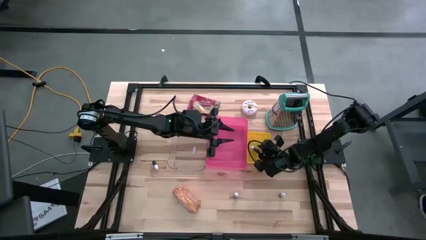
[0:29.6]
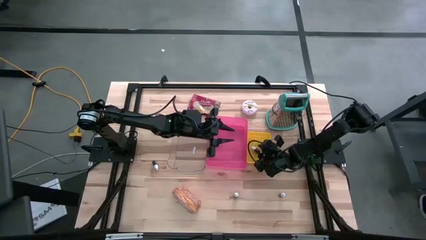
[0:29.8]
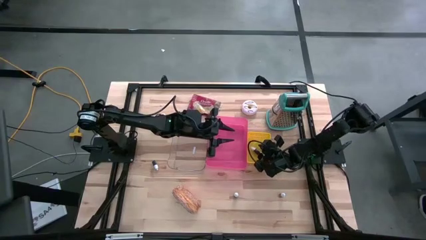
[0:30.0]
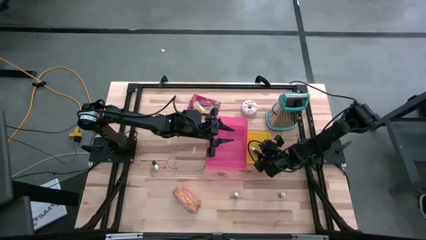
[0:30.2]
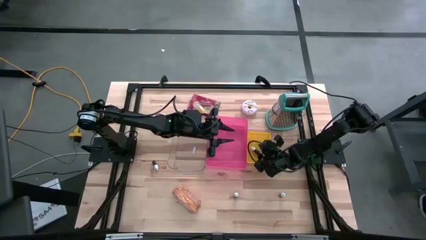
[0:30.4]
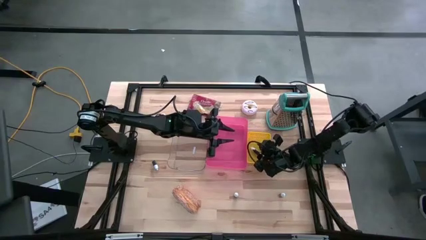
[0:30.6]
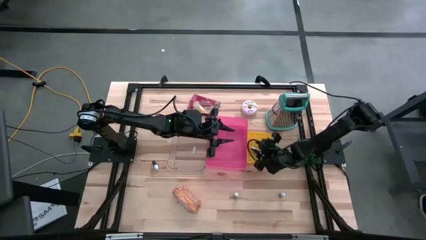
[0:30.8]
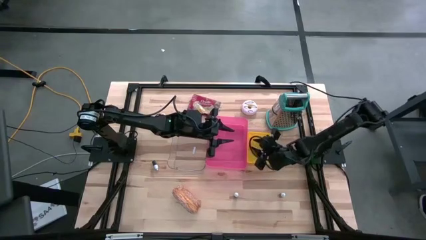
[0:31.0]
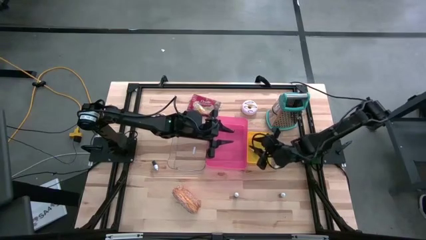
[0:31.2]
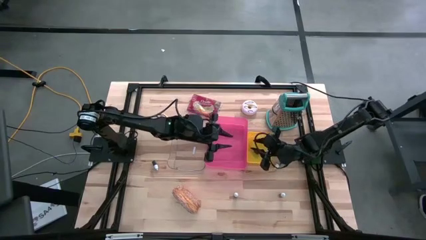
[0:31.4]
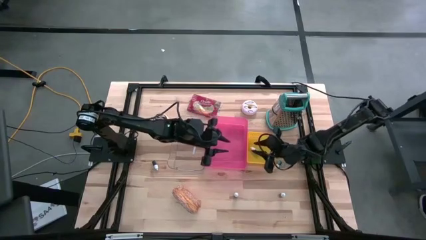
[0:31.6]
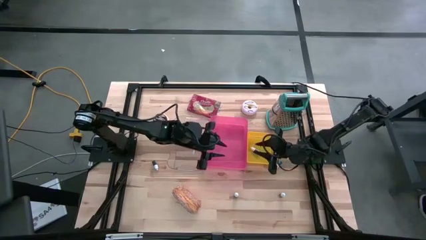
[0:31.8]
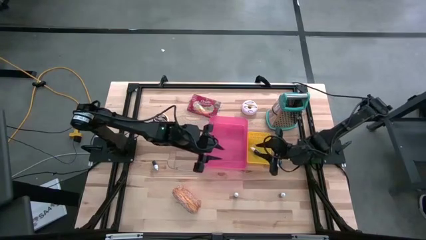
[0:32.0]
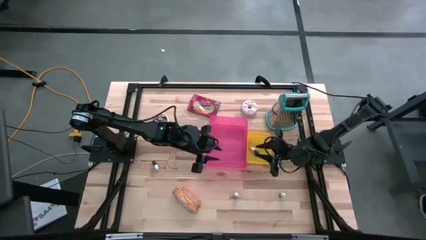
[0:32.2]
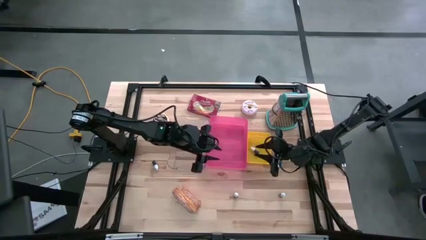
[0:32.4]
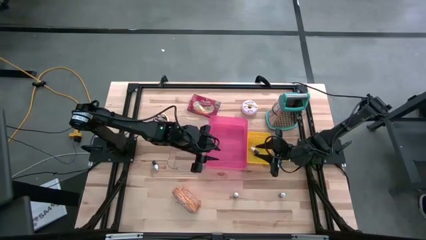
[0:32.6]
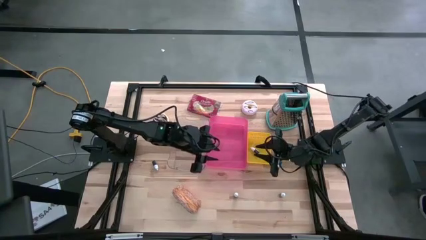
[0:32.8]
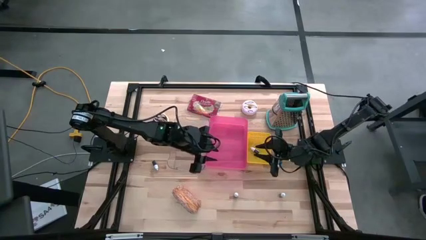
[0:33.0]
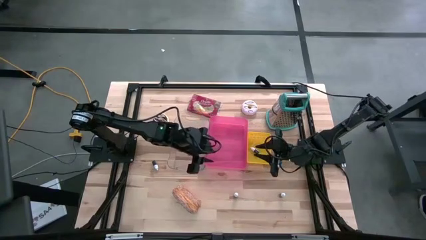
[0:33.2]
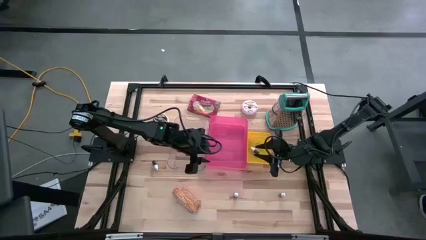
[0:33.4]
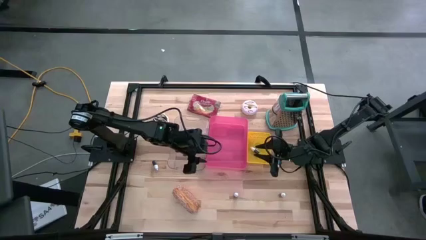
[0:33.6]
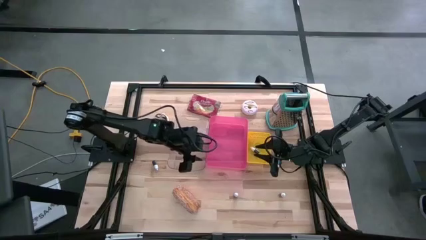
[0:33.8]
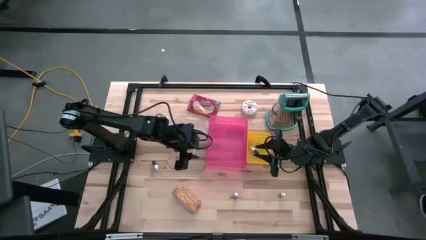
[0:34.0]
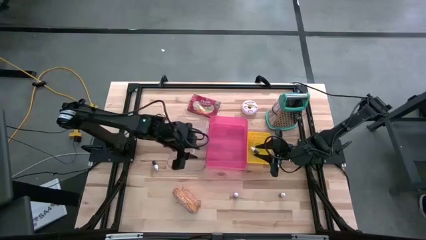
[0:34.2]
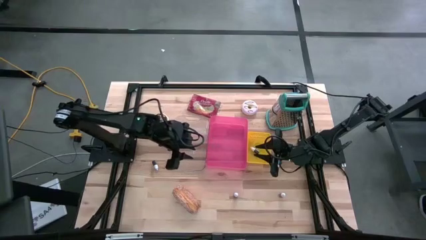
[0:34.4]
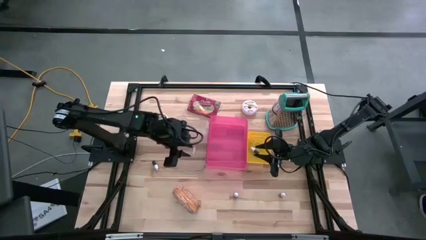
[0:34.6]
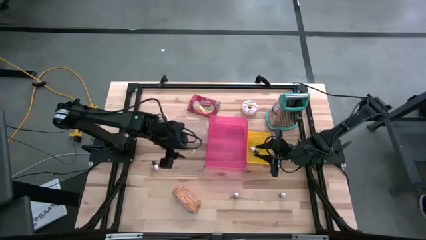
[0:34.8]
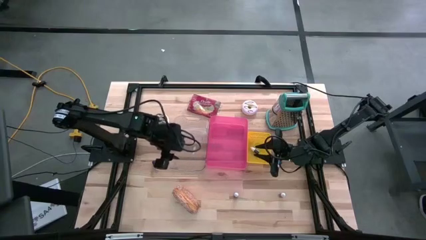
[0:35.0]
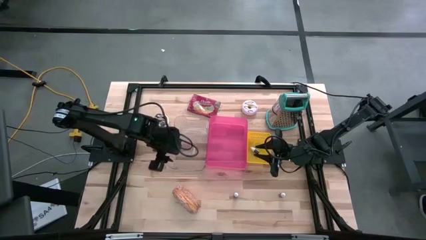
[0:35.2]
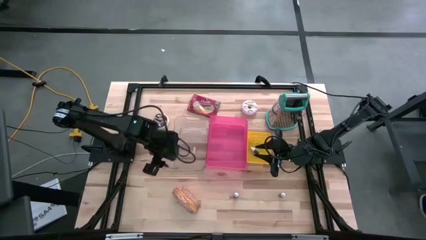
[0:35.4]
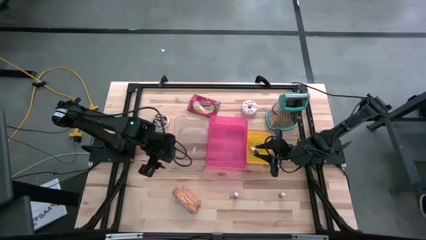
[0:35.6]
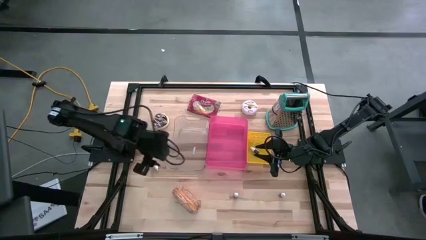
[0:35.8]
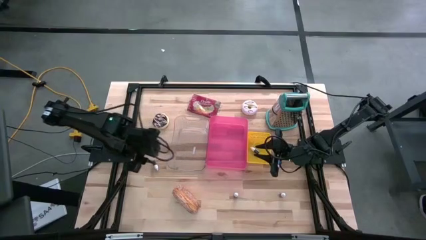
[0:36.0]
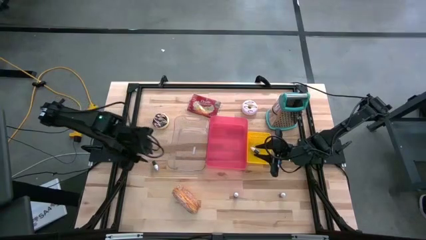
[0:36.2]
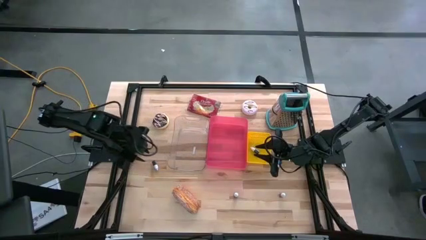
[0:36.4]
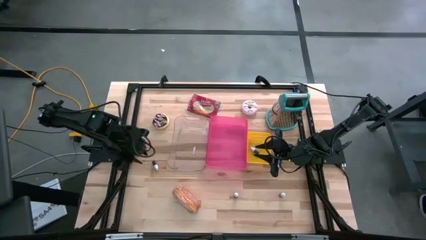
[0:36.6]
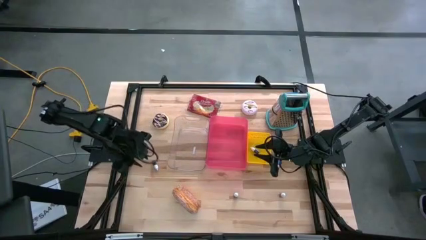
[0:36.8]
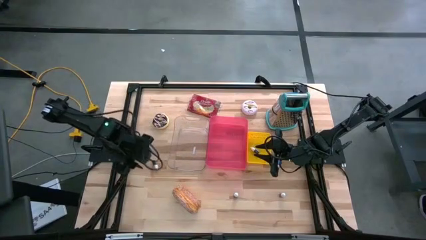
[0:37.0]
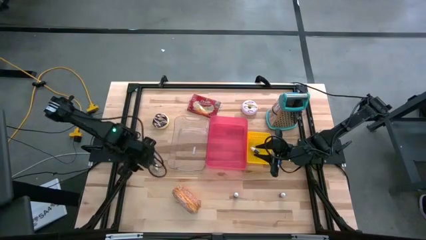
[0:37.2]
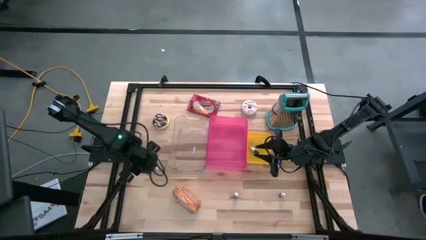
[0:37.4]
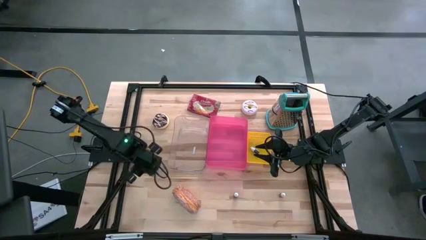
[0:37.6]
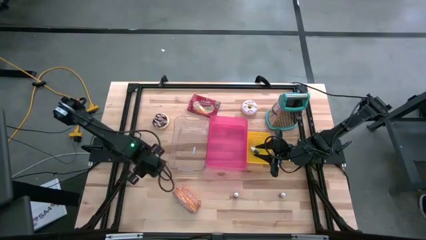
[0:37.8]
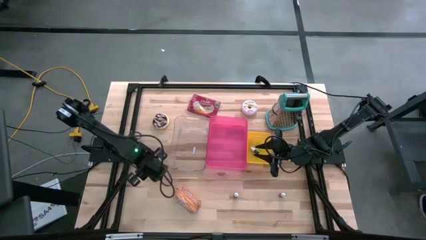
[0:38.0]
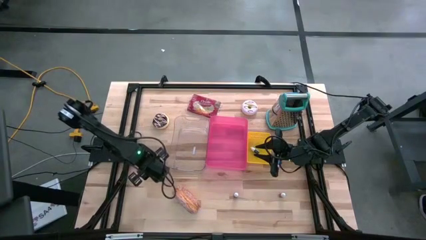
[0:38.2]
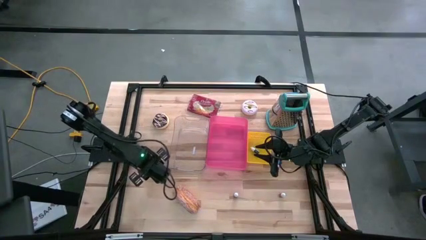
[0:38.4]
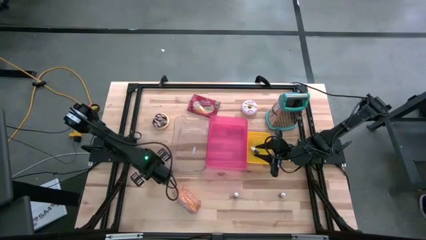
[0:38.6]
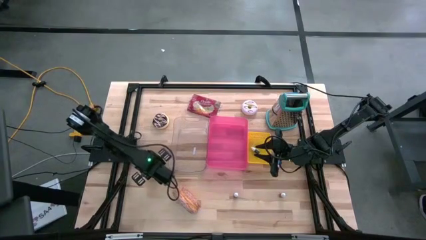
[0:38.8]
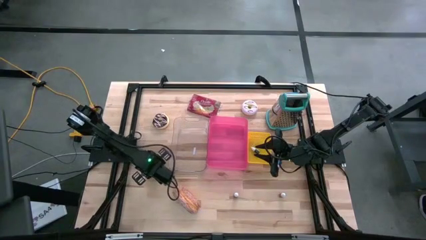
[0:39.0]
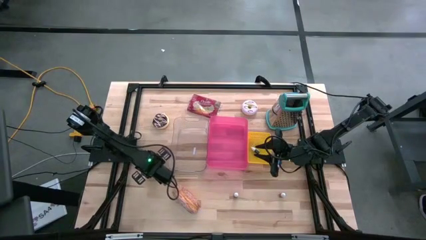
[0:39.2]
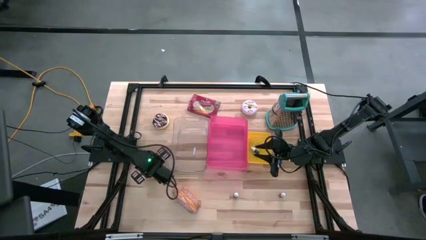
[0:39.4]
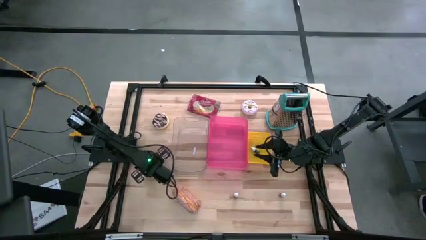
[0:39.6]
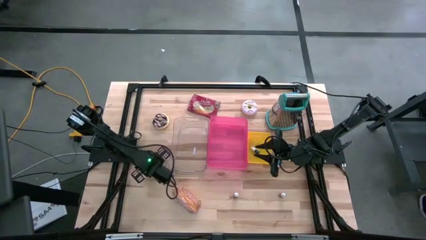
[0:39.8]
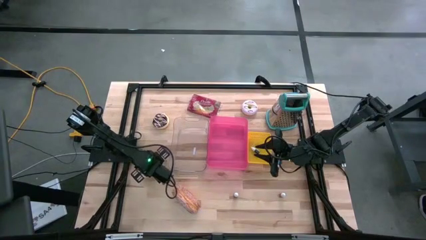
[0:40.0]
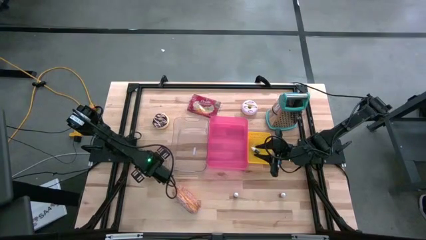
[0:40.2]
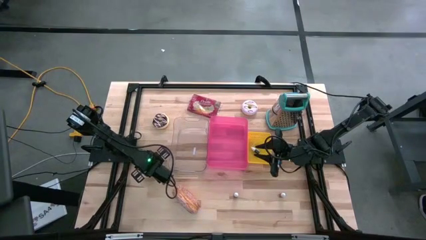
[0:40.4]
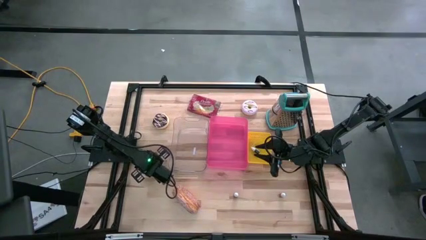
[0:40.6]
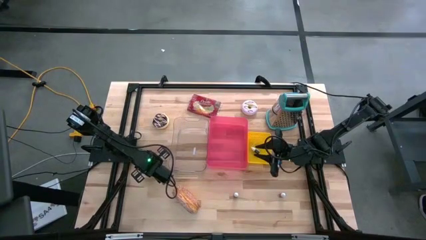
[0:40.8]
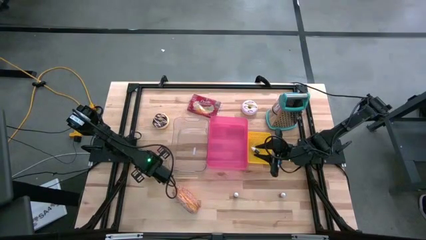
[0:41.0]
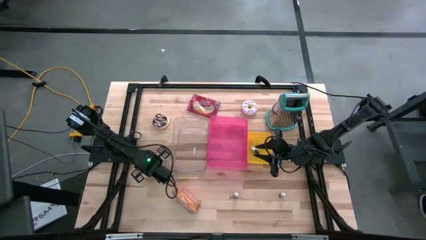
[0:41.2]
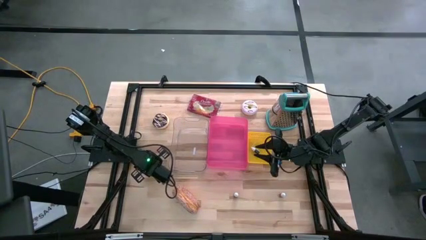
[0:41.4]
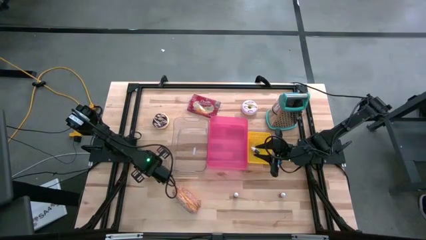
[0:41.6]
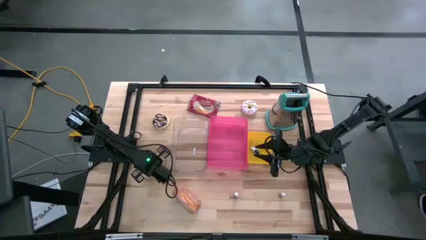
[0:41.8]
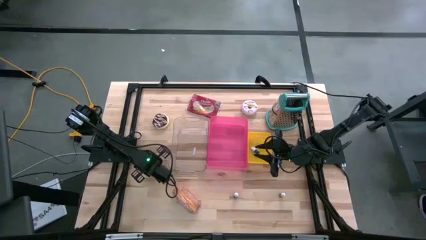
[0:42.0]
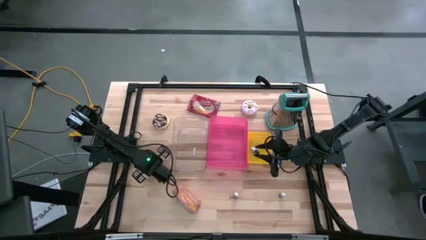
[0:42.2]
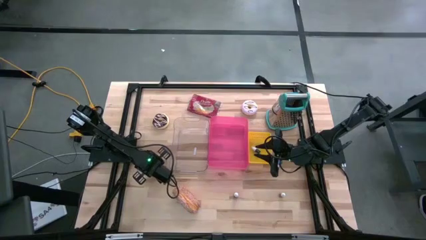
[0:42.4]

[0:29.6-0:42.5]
Put the black food coloring bottle into the yellow bin
